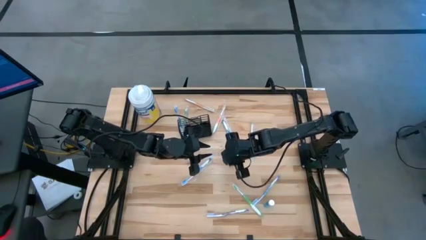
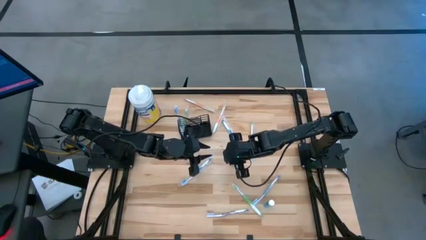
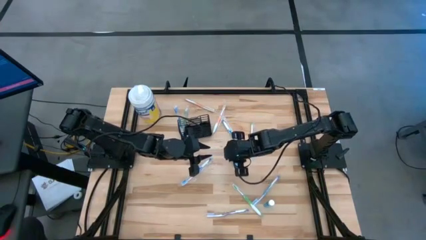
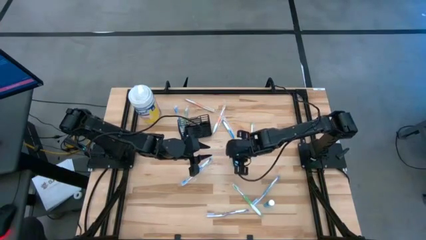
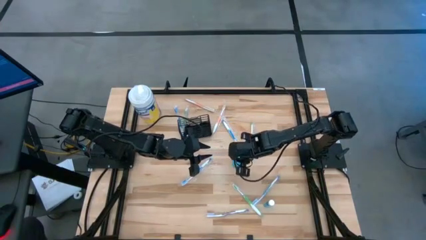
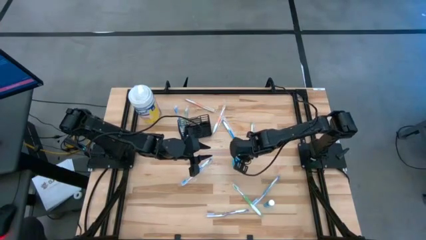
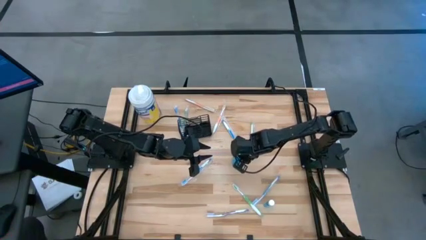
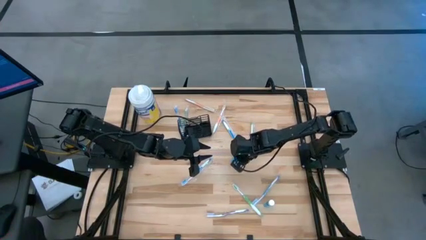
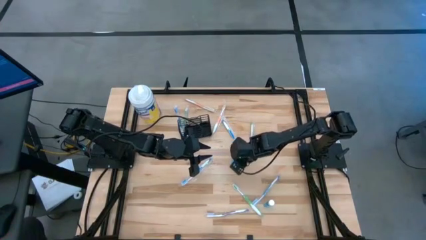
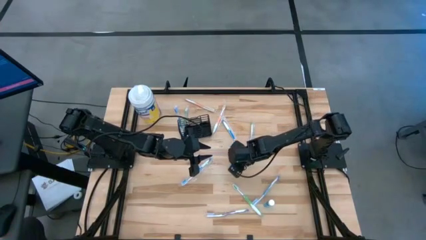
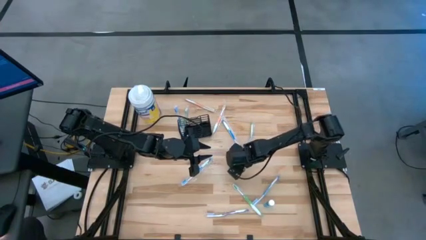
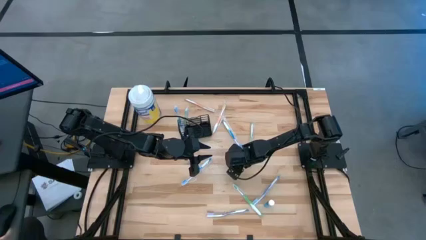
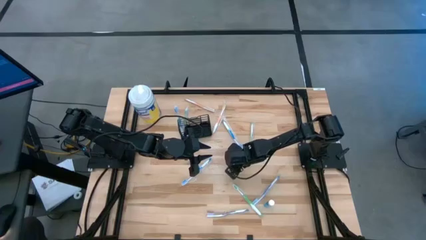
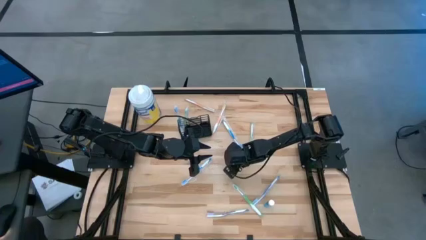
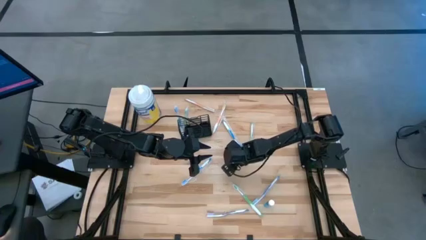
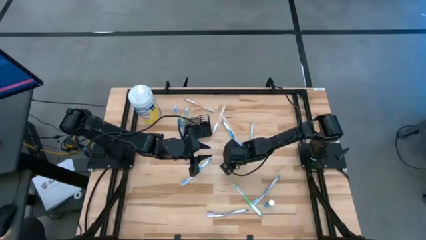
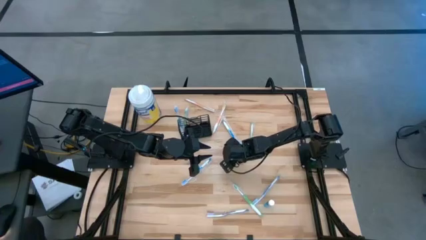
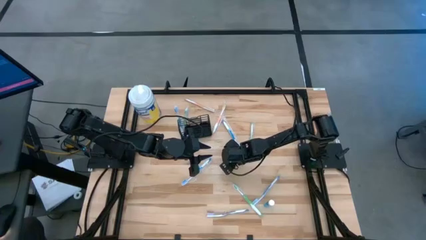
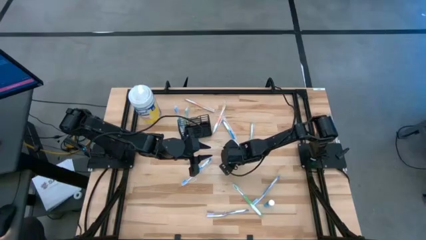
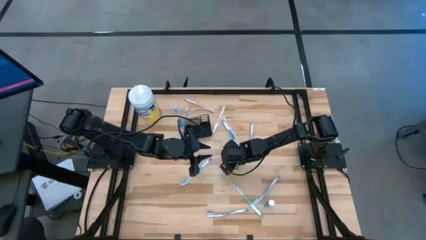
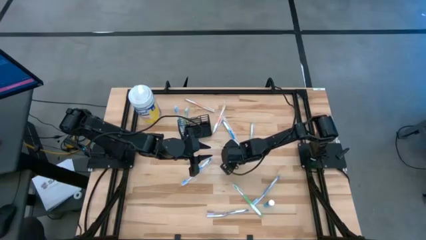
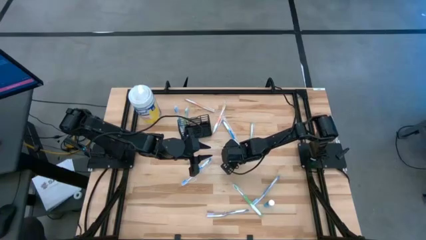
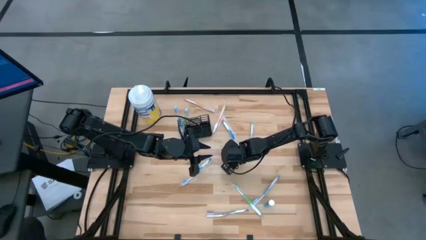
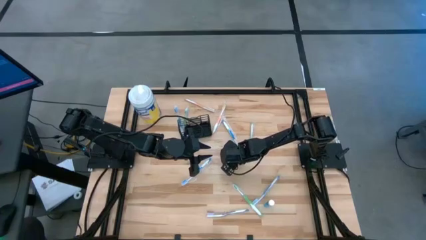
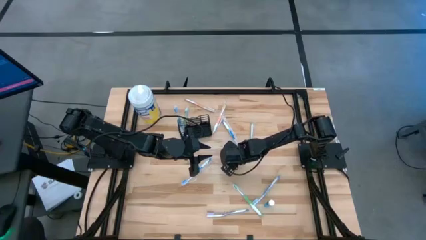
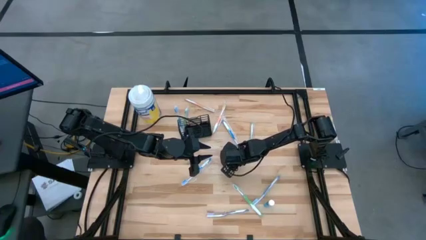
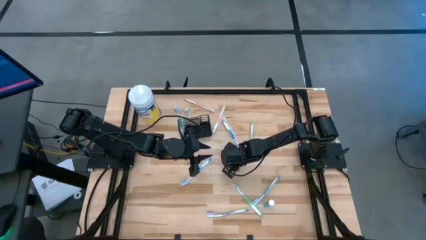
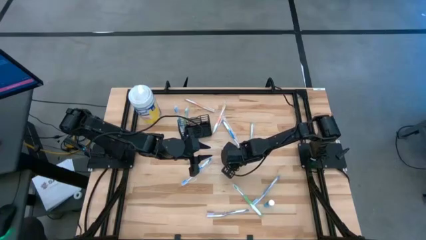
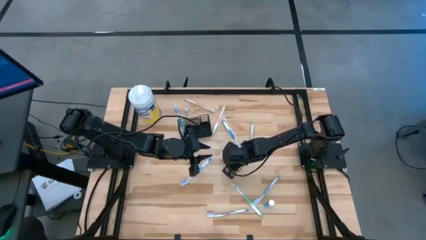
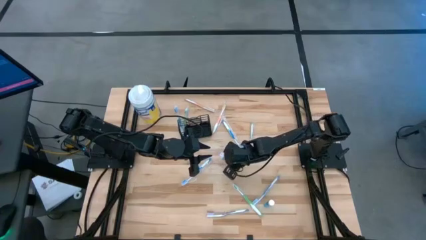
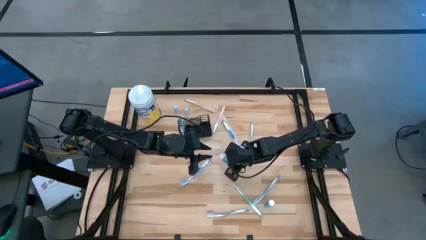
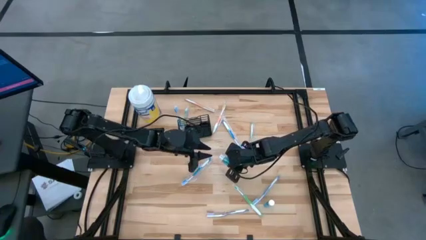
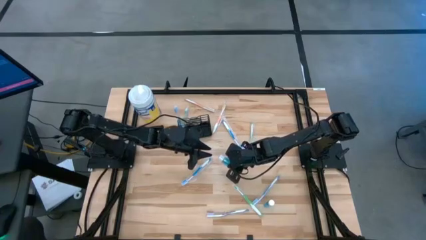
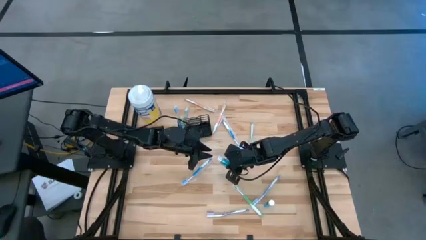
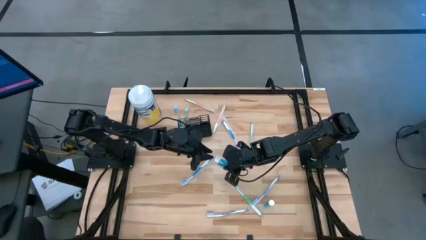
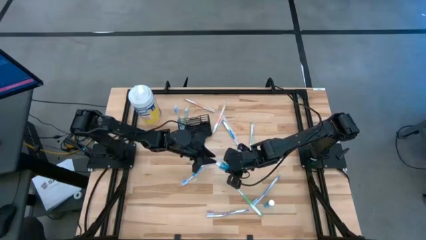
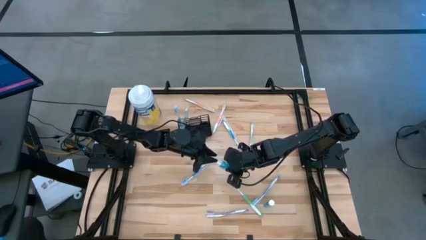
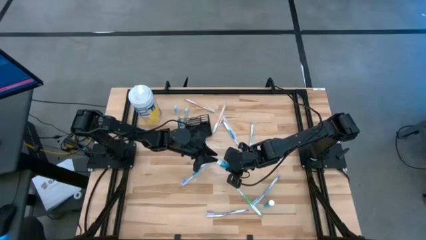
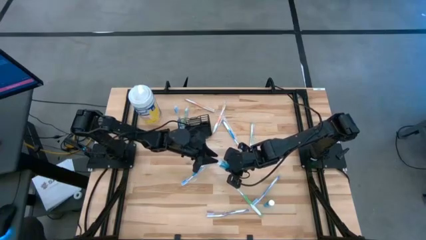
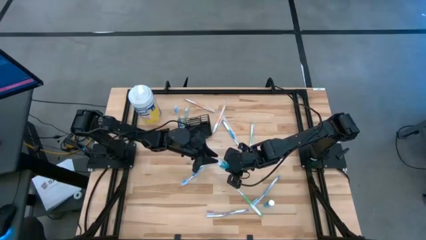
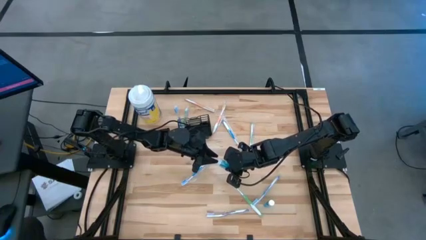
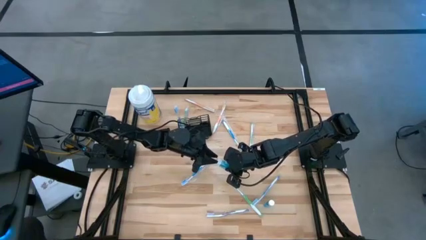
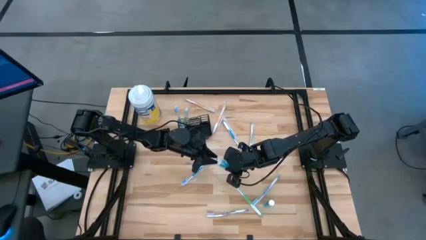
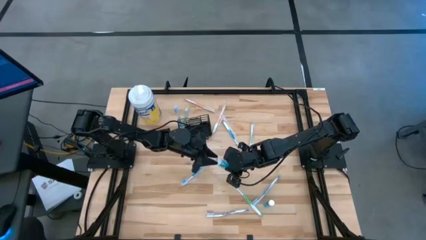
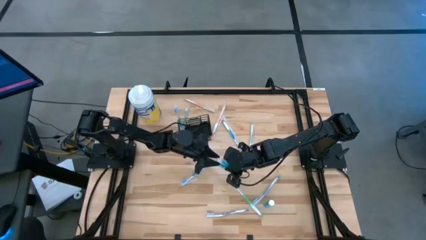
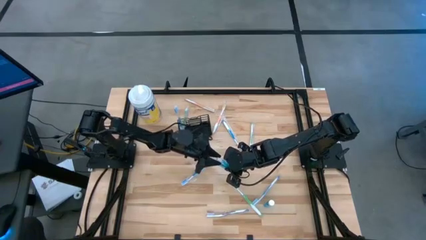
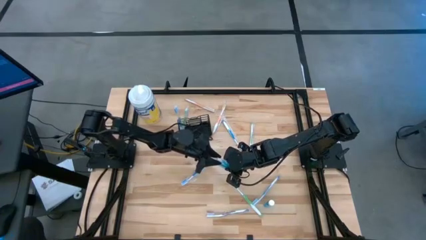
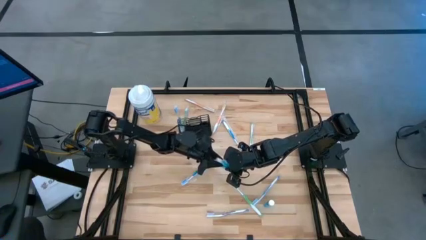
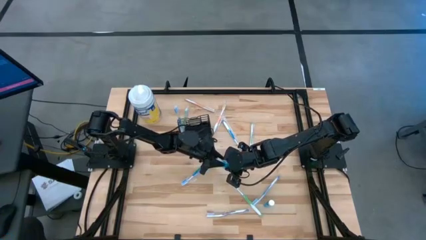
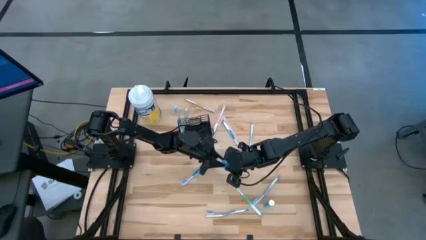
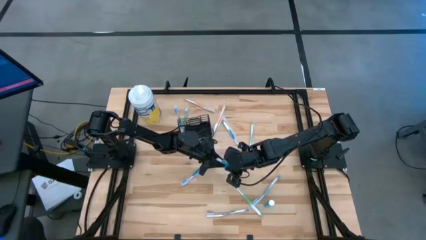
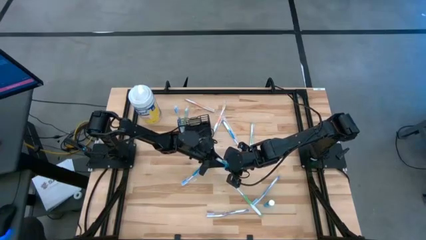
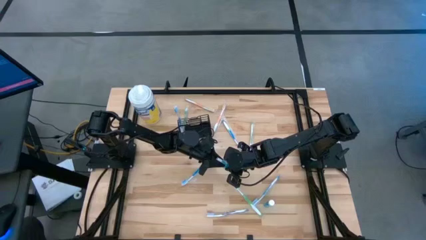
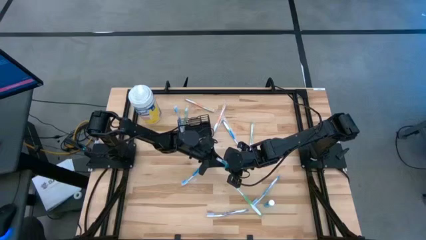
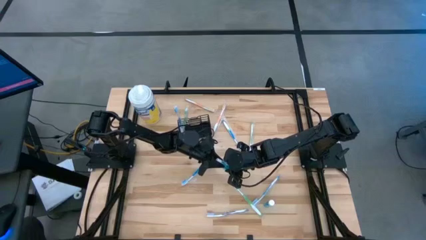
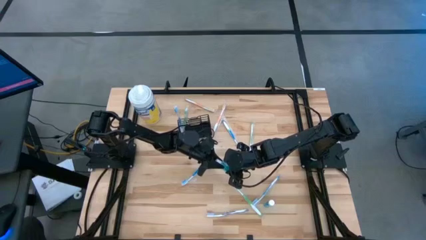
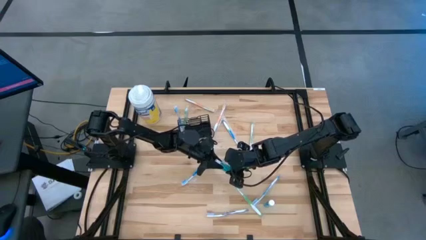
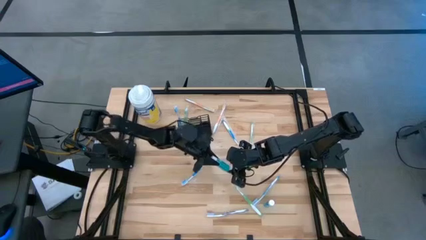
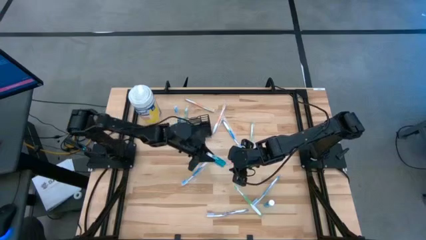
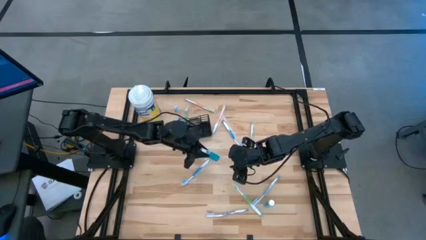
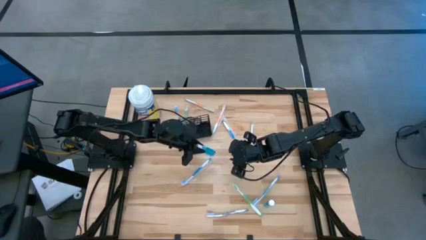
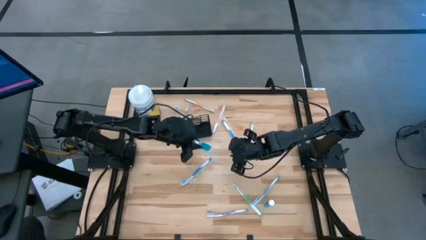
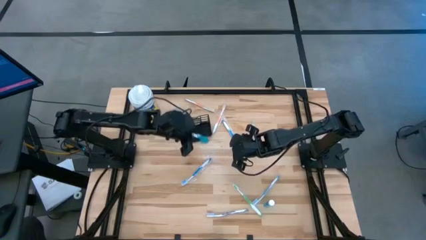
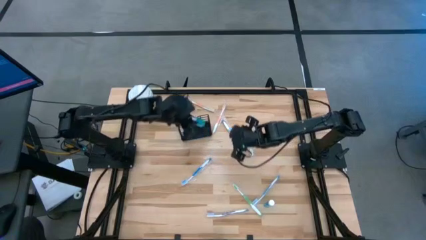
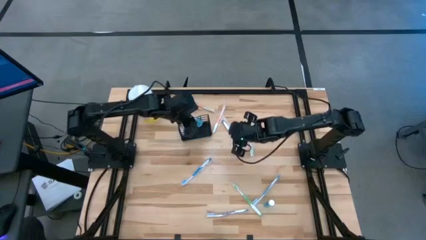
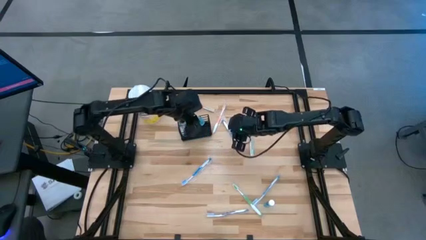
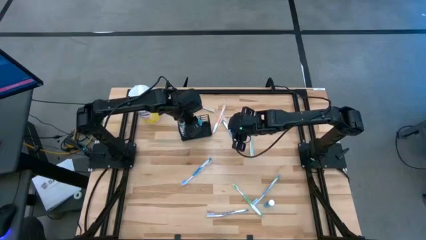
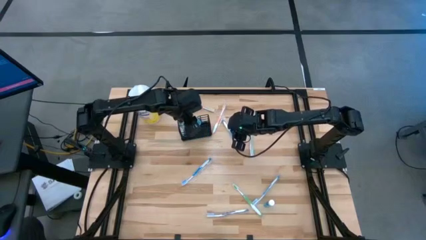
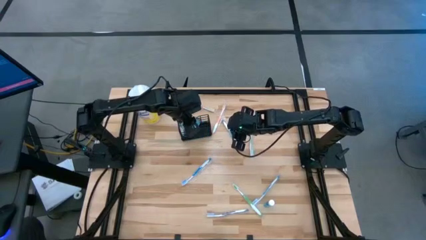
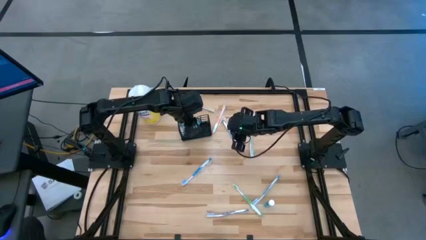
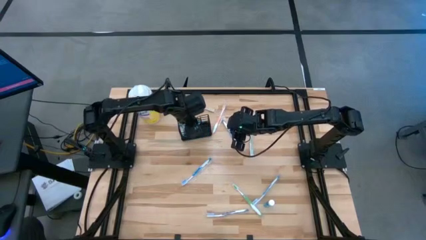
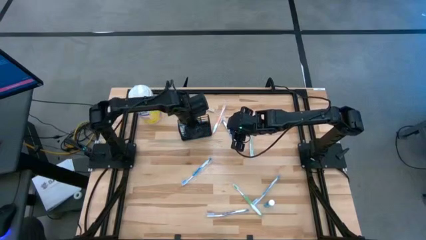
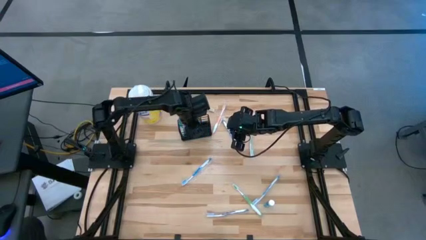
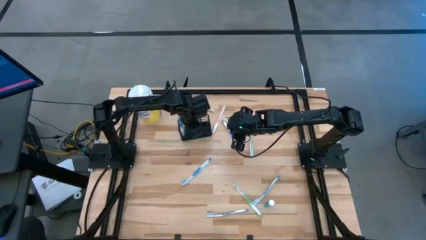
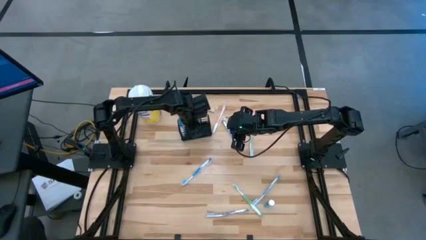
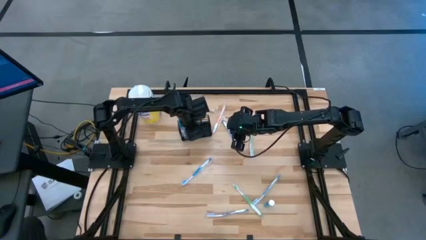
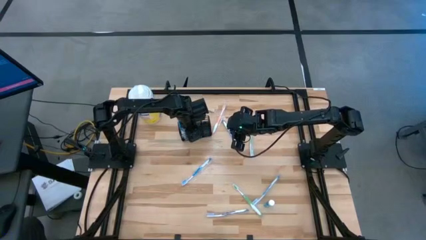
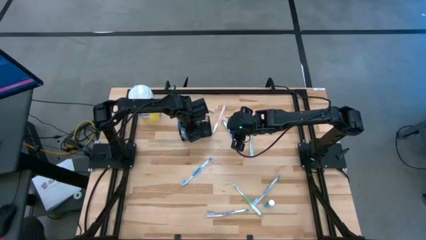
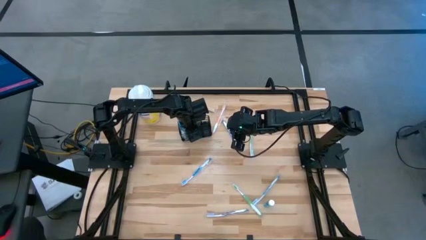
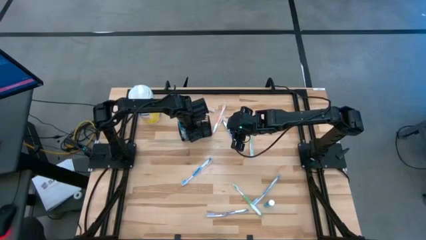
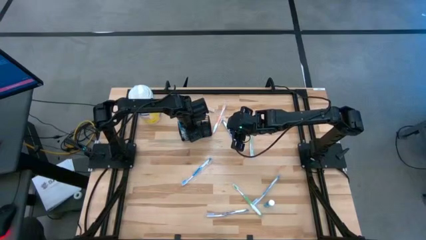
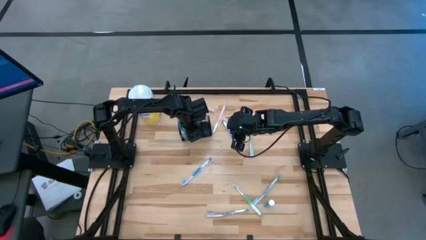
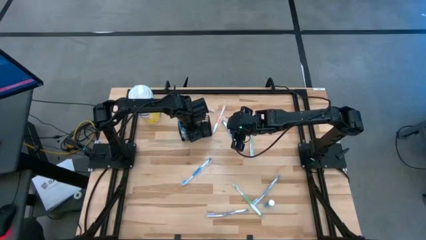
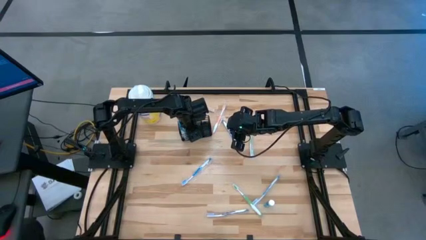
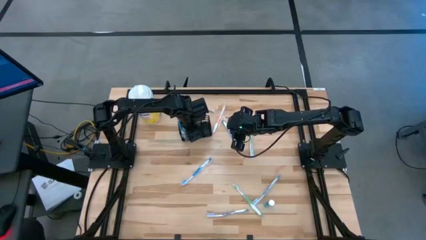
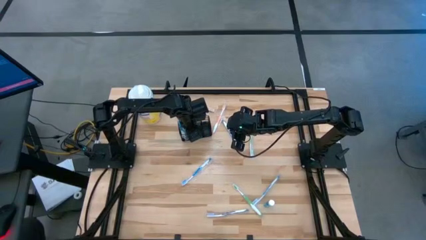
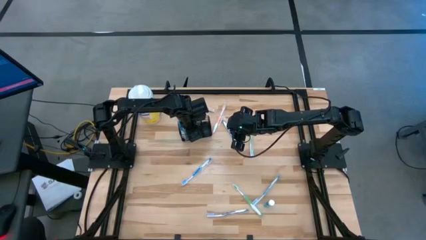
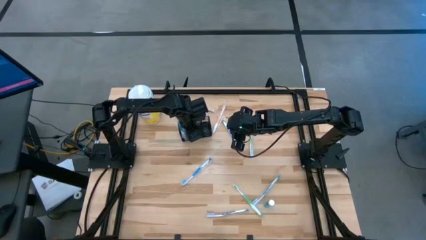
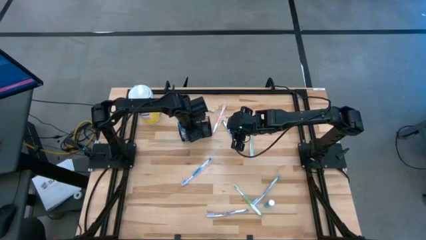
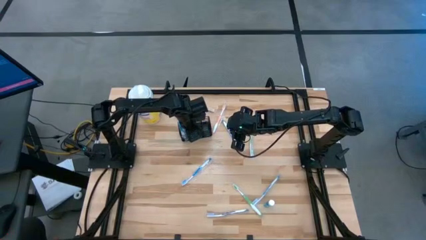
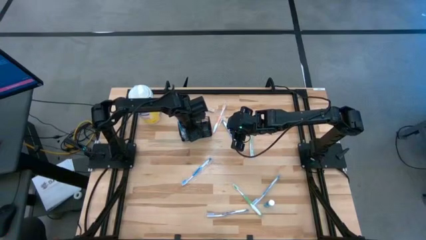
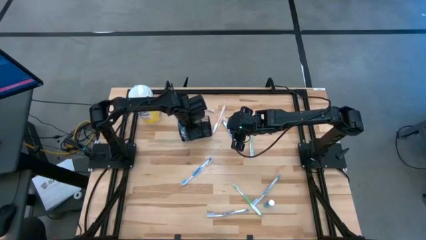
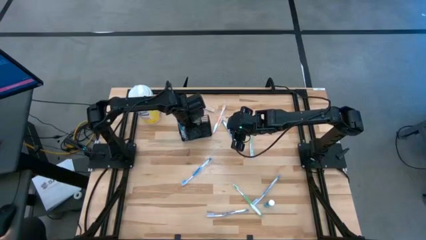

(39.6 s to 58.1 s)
Task: Pick & Place toothbrushing station
Put the top mouthwash bottle into the mesh organizer
